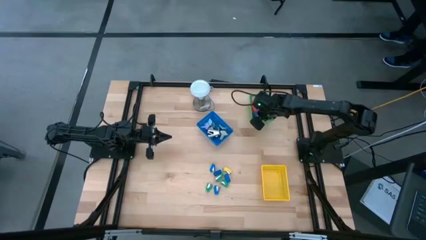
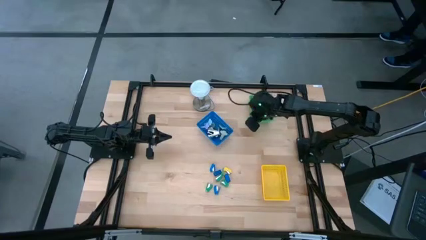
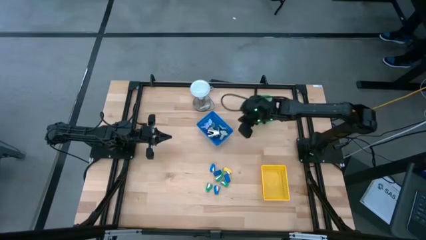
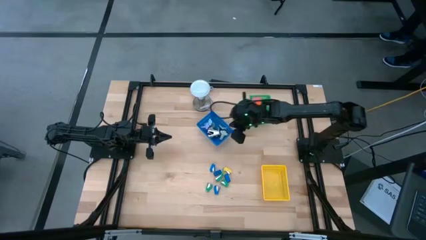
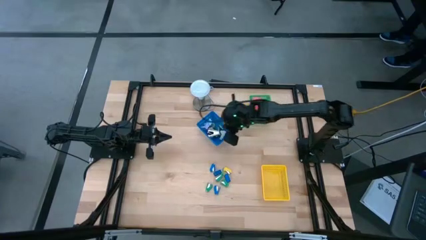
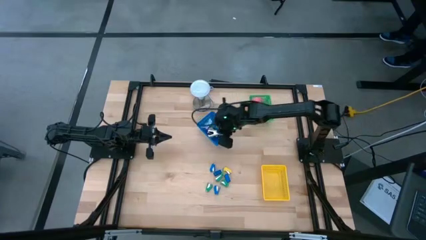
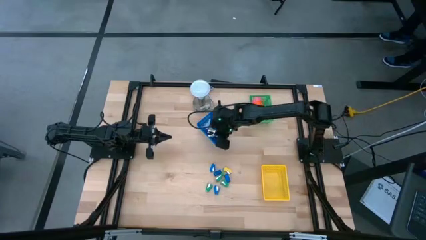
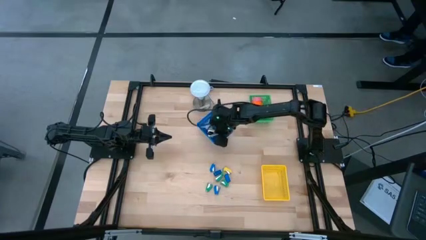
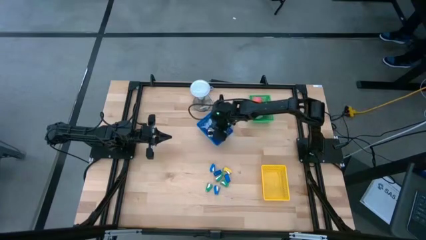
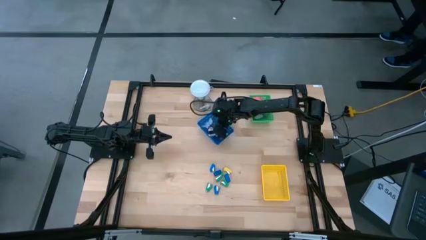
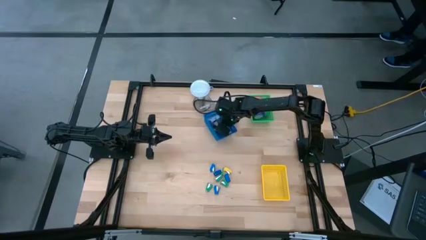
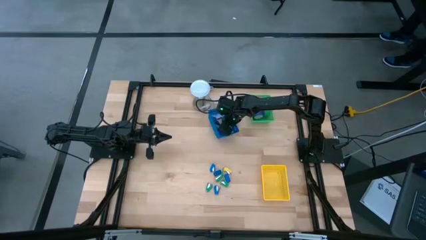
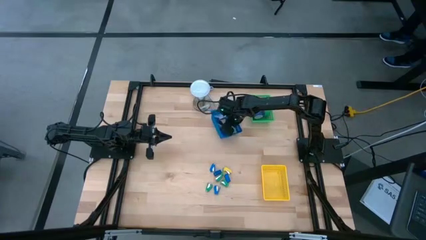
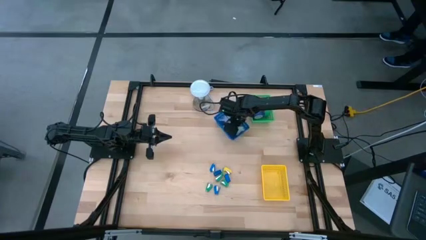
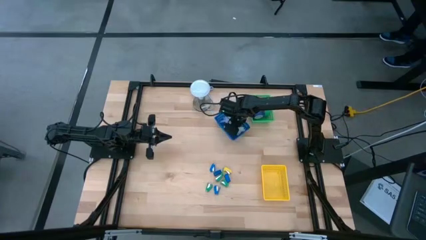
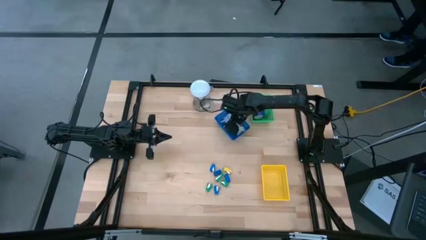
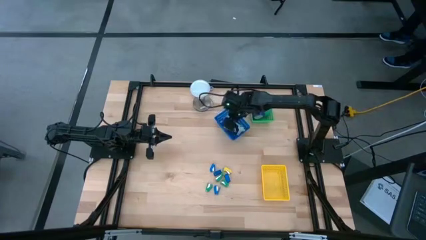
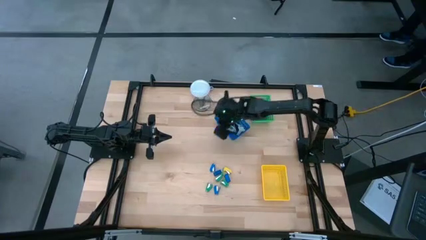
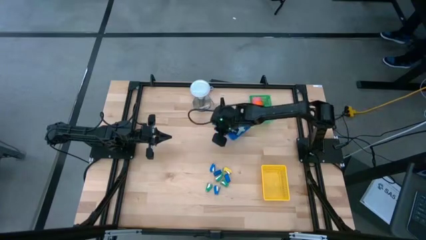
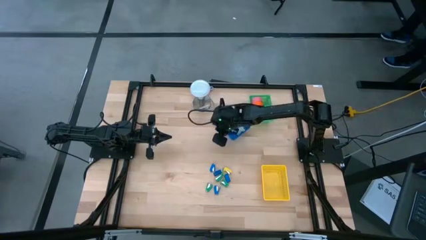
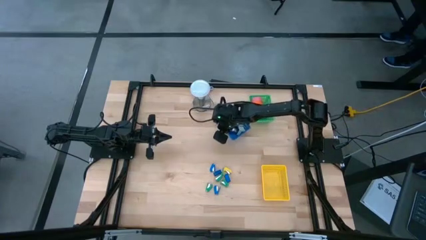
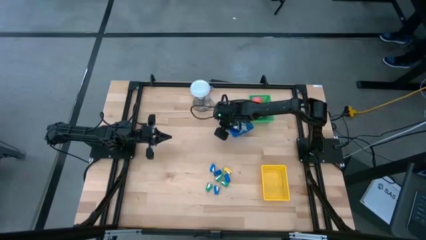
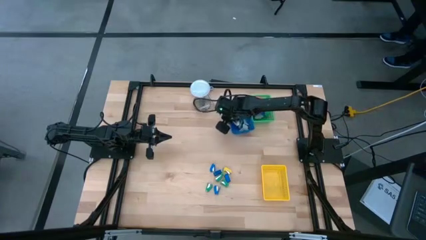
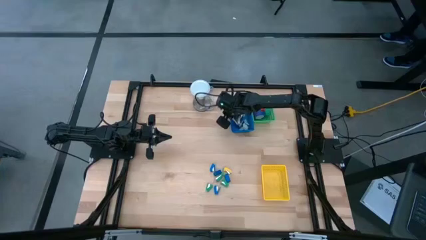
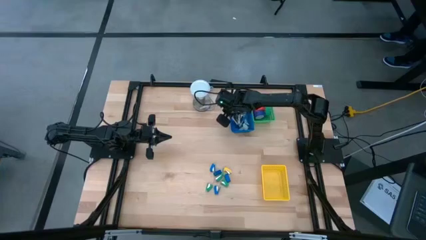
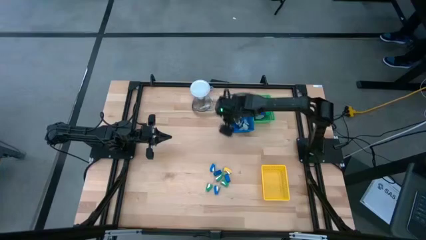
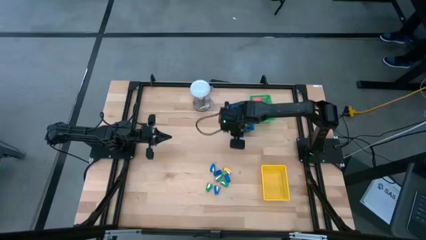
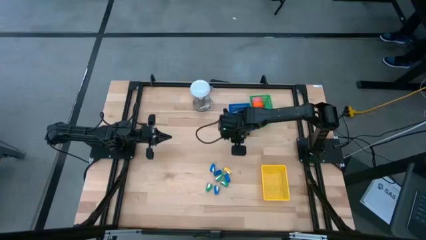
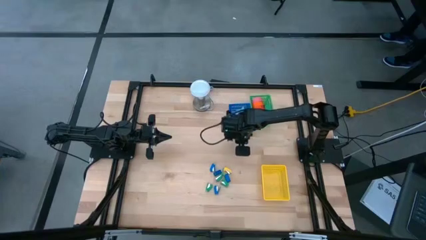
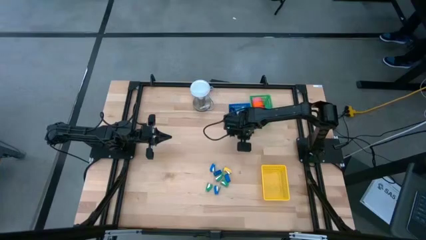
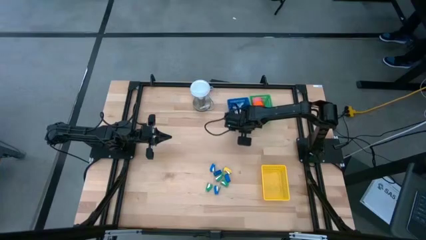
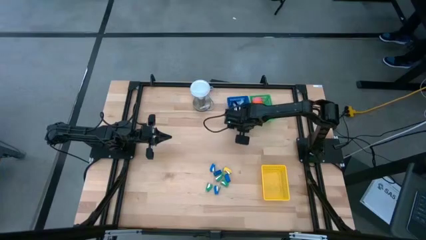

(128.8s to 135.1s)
Task: Pick and place Stapler, Stapler remover, tape
Move the blue bin to the top of the table

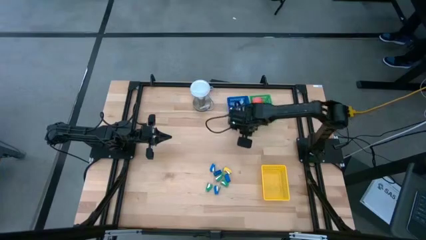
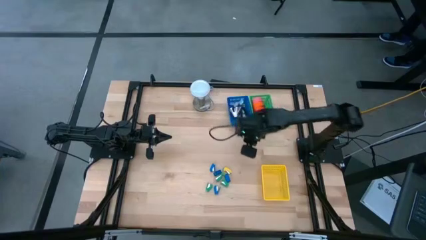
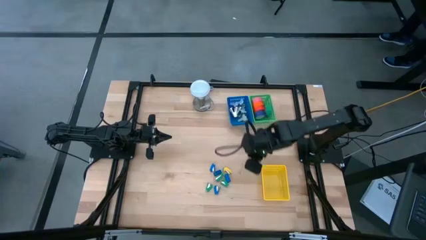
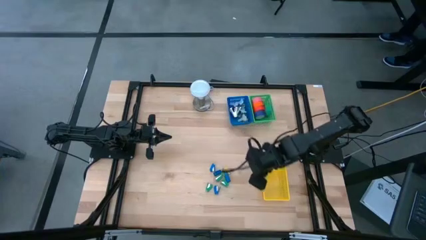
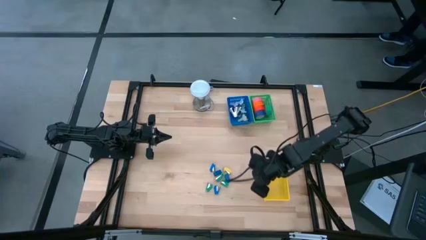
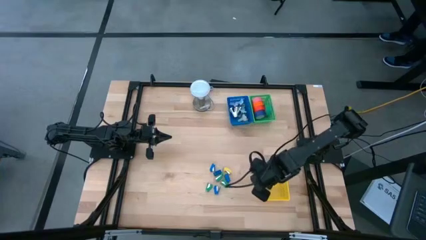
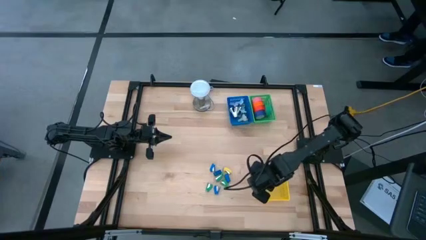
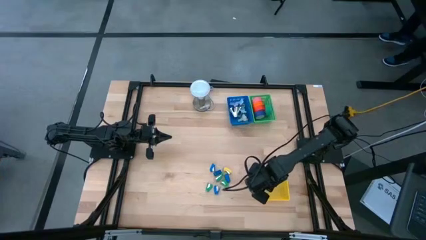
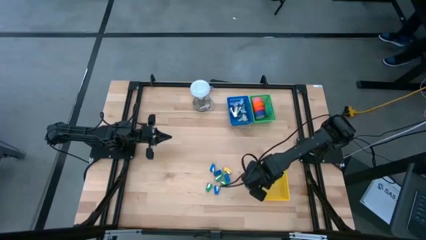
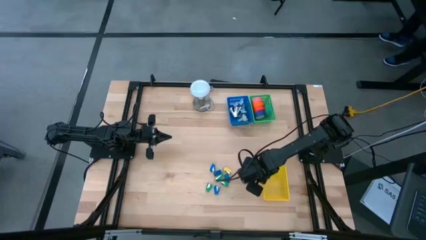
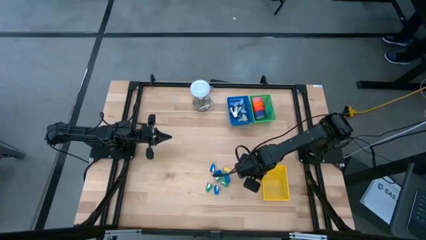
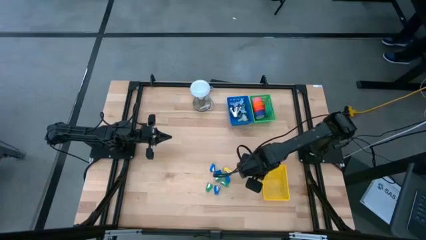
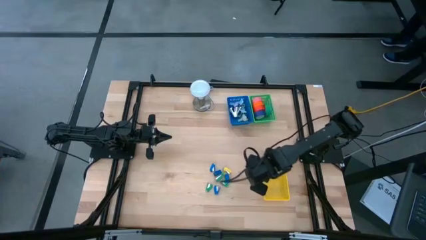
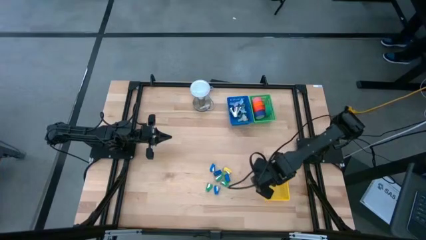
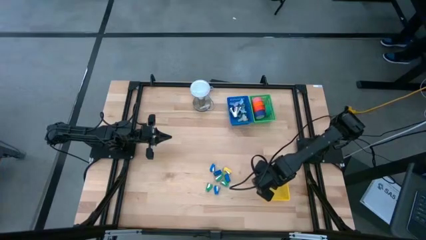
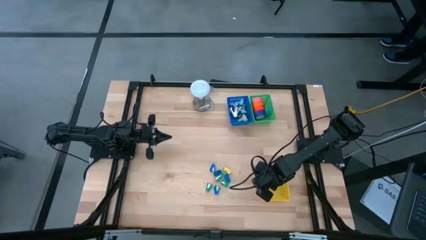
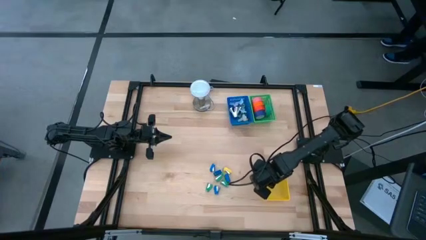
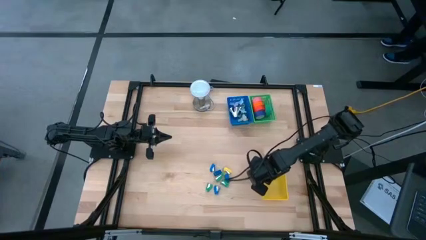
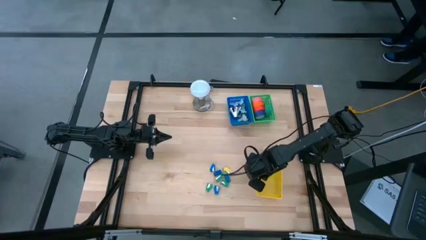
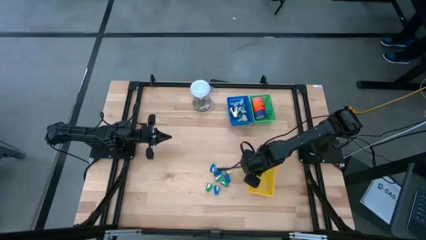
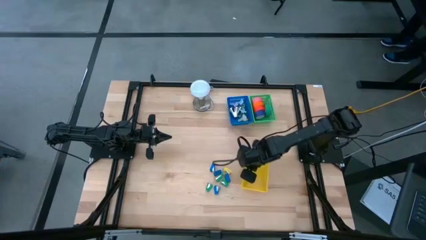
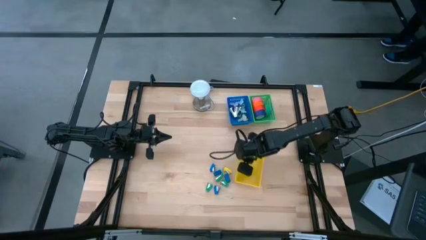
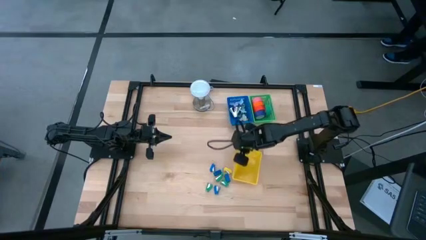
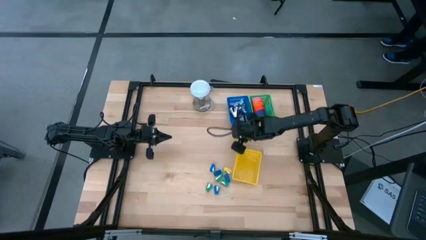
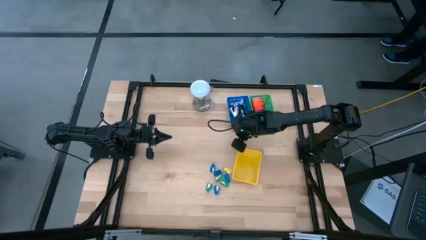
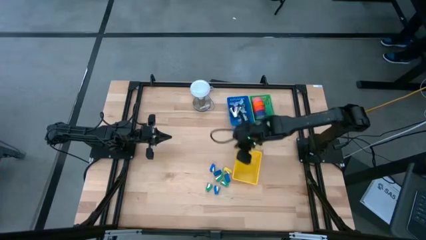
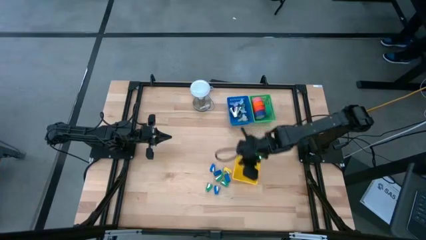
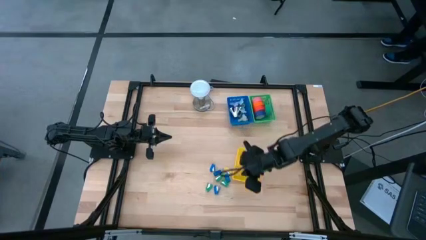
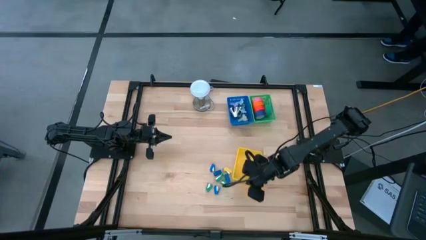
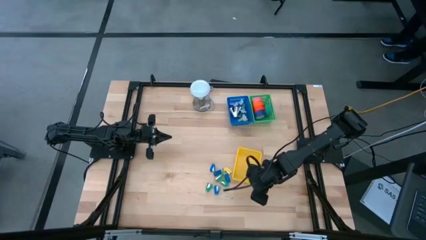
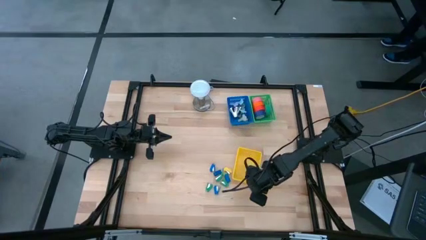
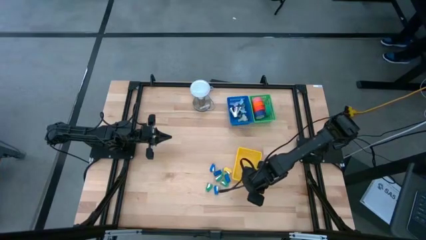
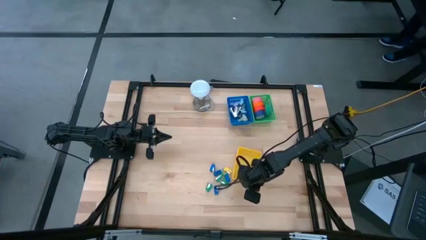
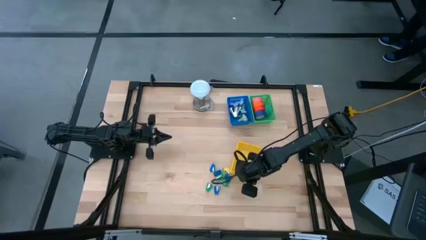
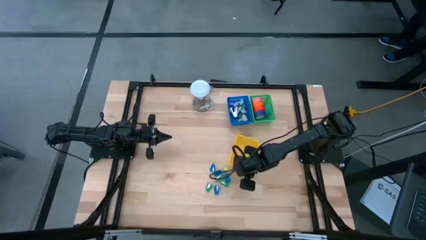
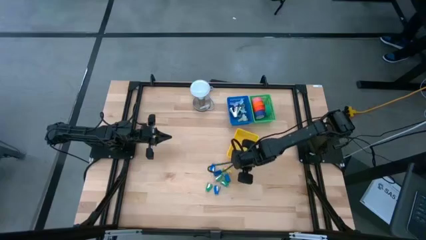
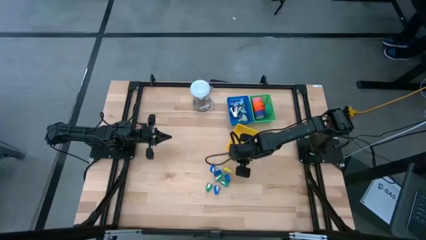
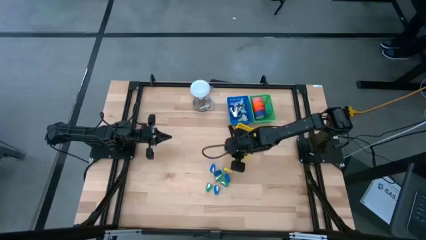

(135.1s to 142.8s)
Move the yellow bin to the top of the table

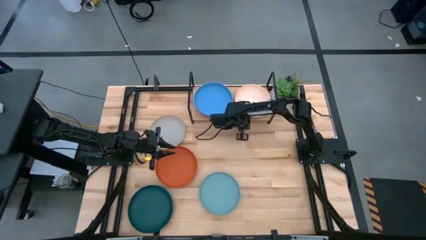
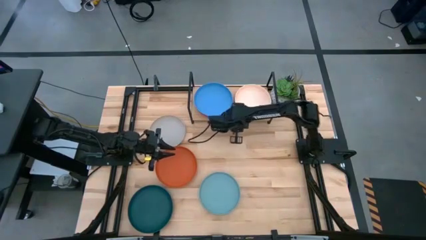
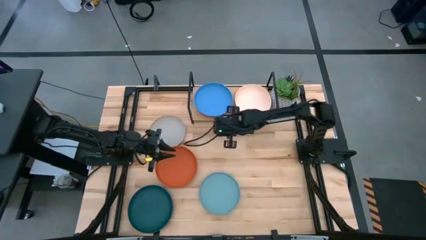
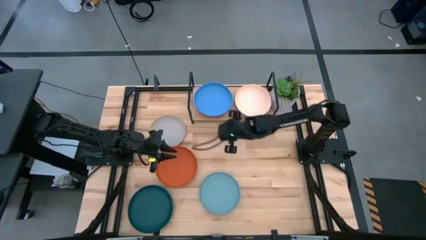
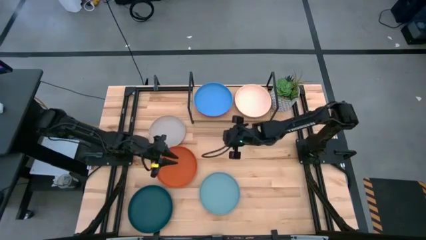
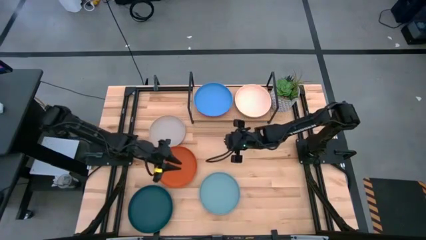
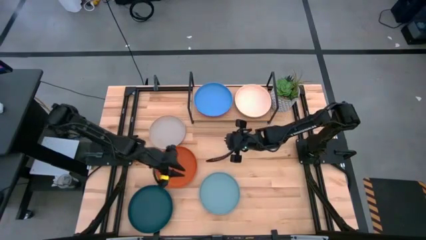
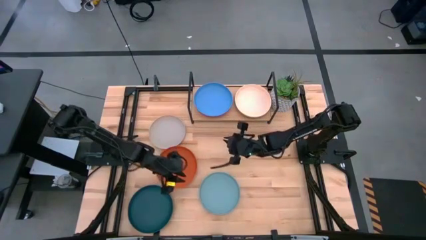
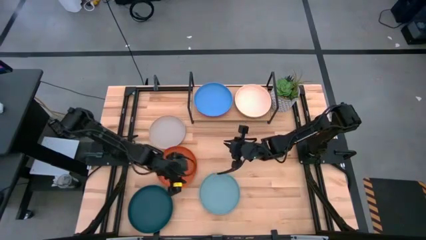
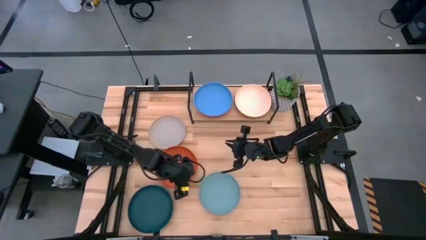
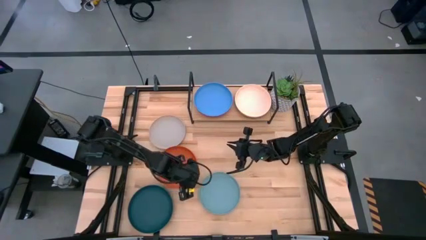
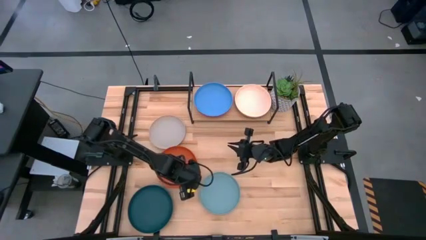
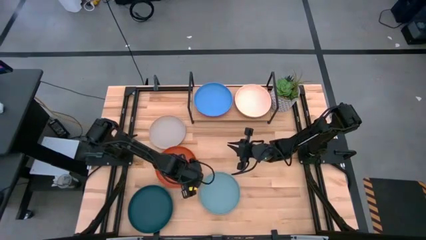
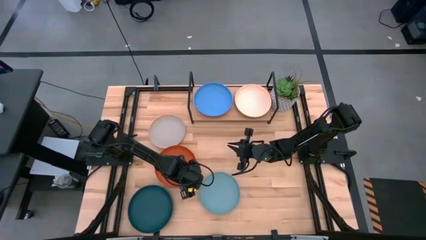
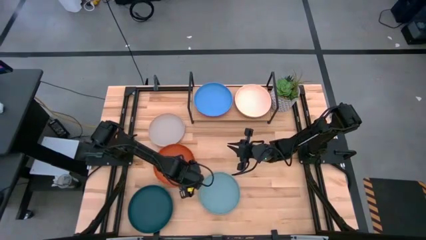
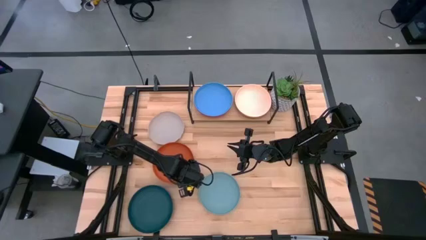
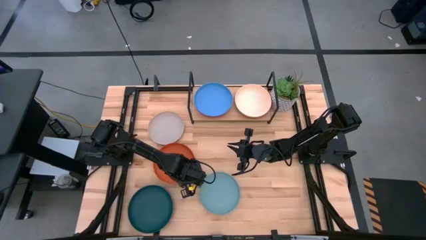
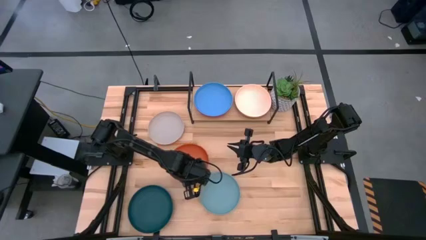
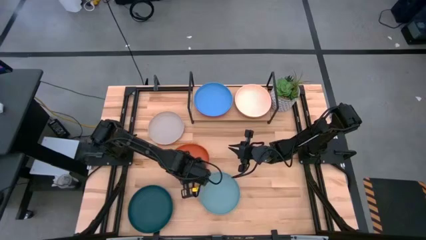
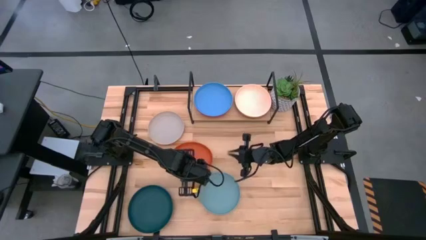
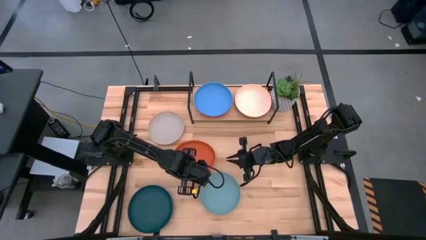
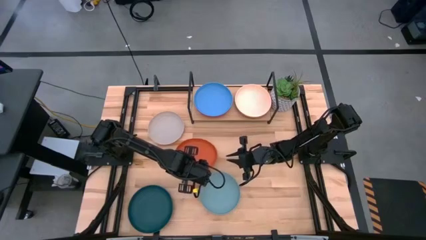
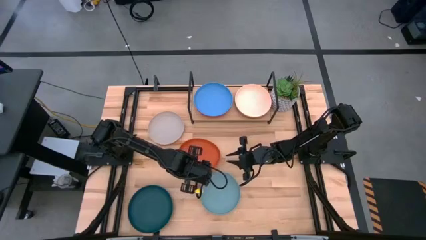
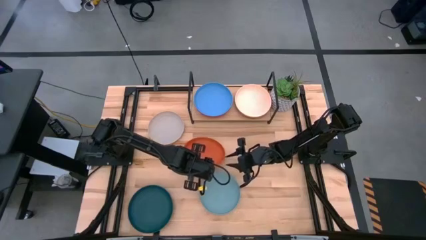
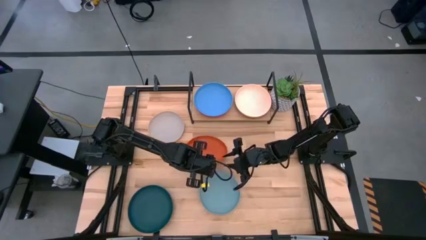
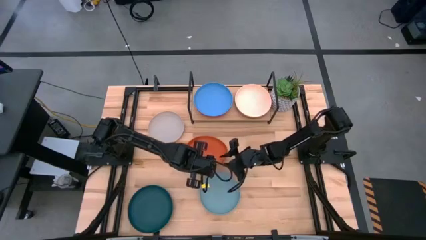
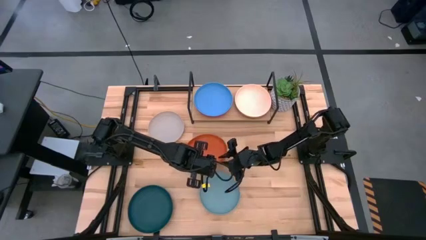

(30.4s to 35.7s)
Task: Place and stack plates onto a shelf
Stack the orange plate on top of the blue plate on the shelf
